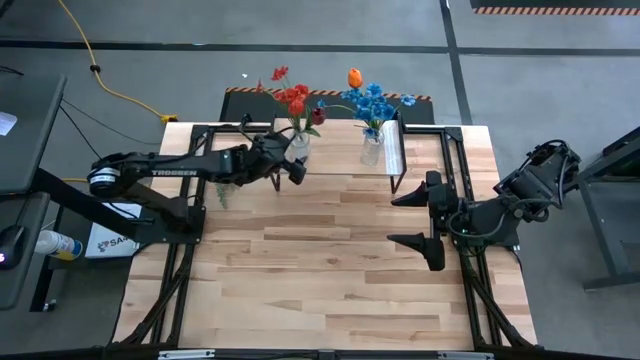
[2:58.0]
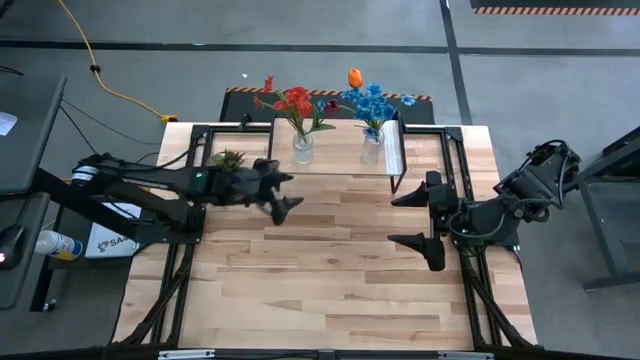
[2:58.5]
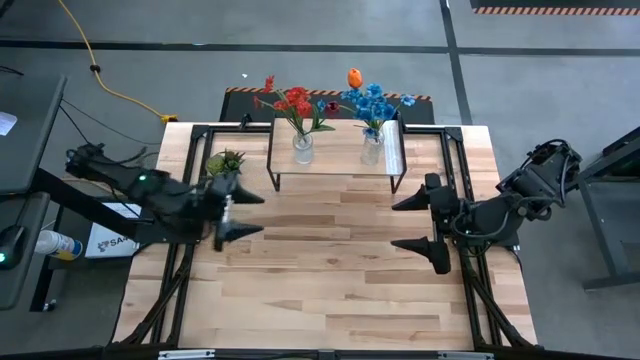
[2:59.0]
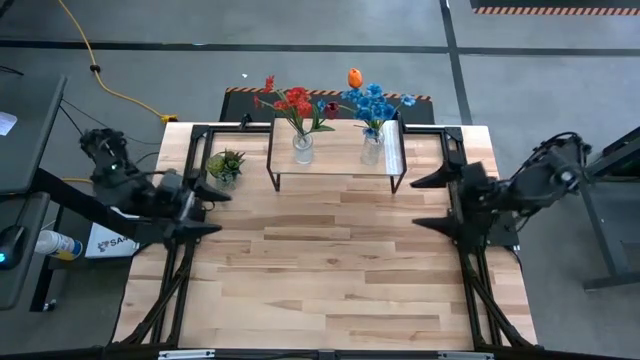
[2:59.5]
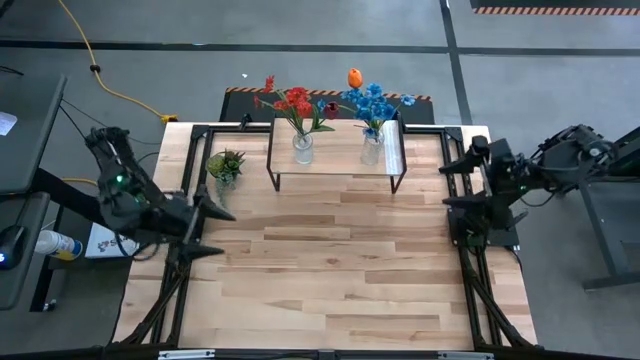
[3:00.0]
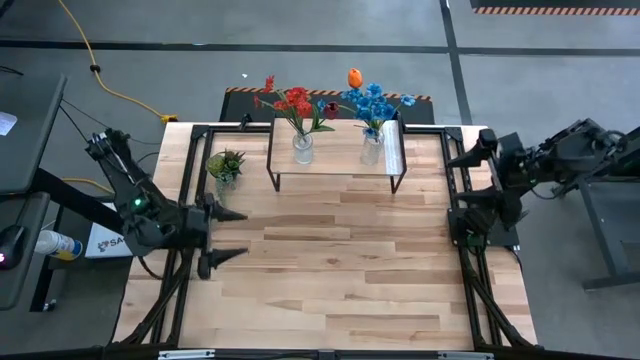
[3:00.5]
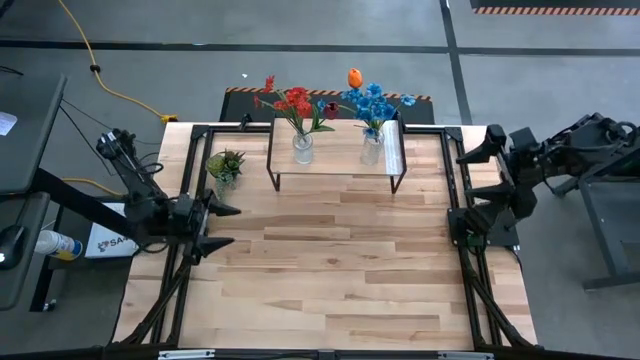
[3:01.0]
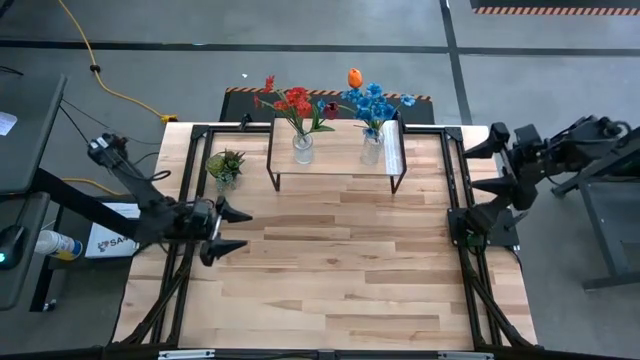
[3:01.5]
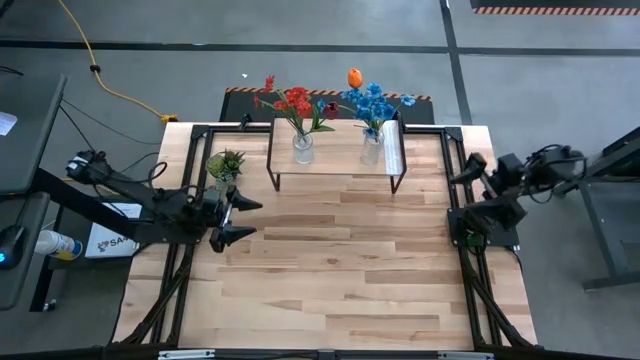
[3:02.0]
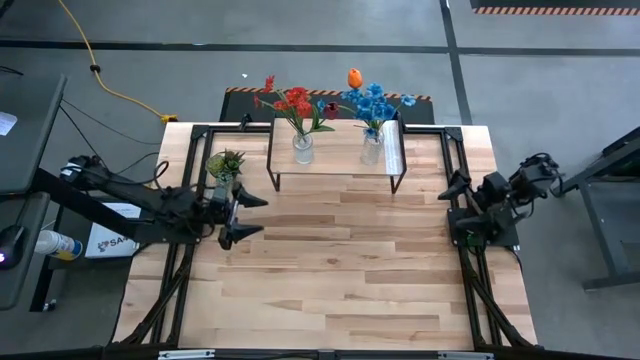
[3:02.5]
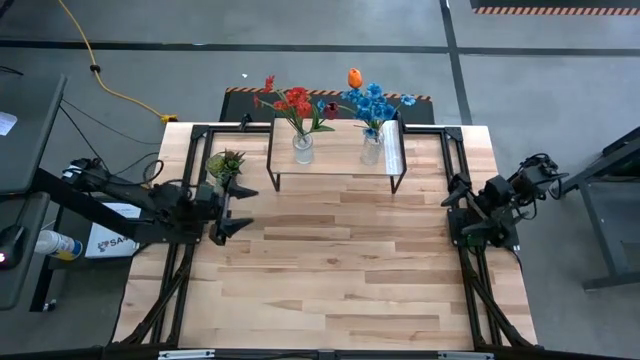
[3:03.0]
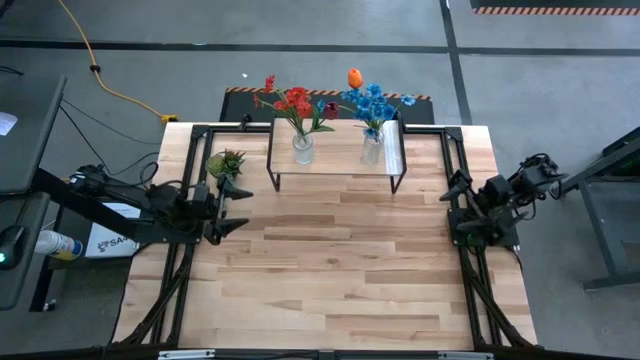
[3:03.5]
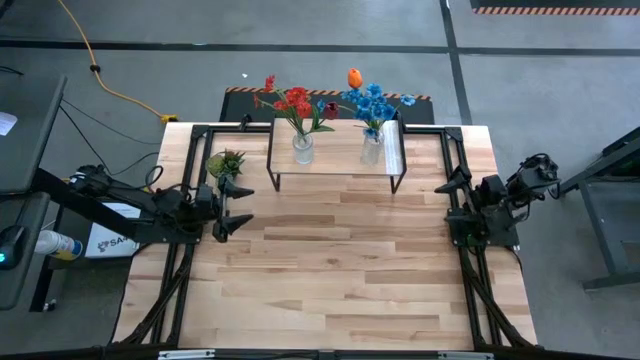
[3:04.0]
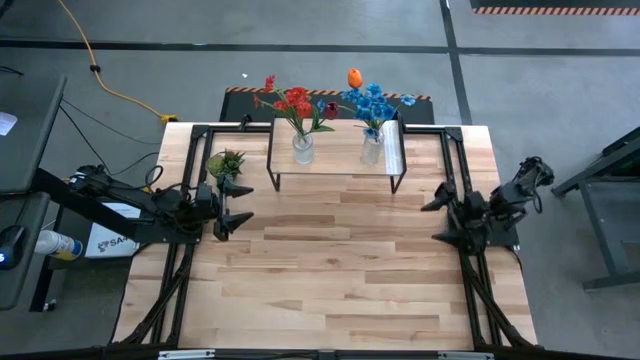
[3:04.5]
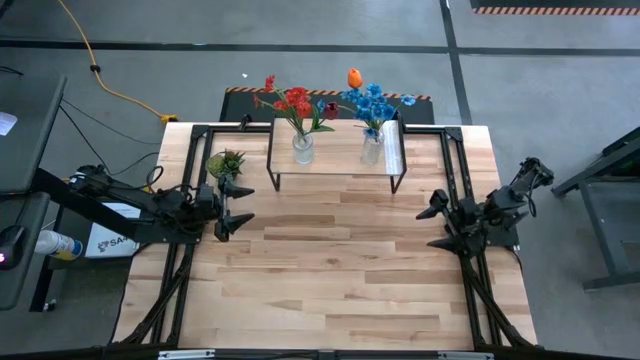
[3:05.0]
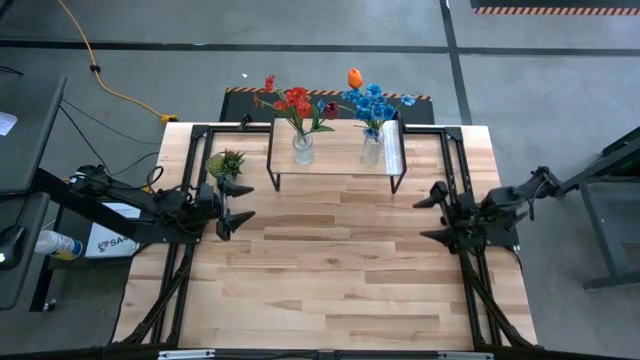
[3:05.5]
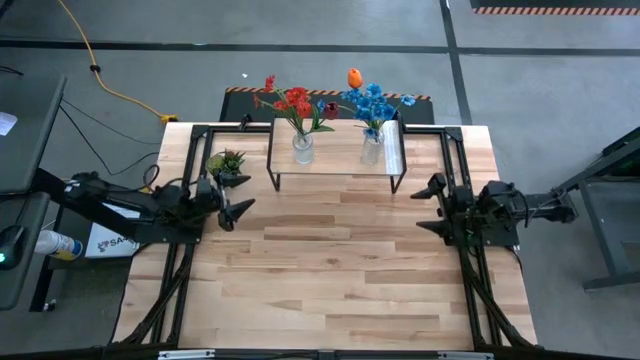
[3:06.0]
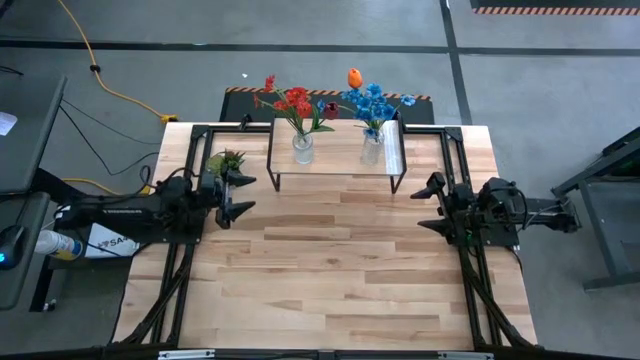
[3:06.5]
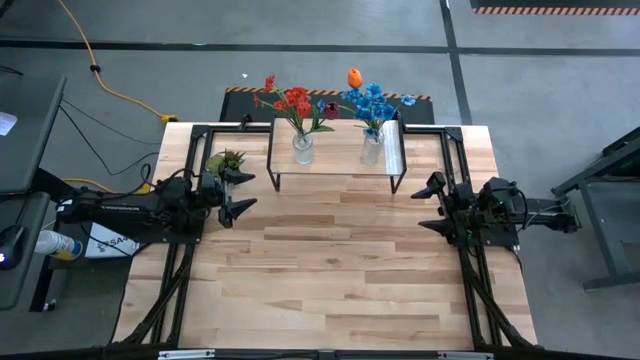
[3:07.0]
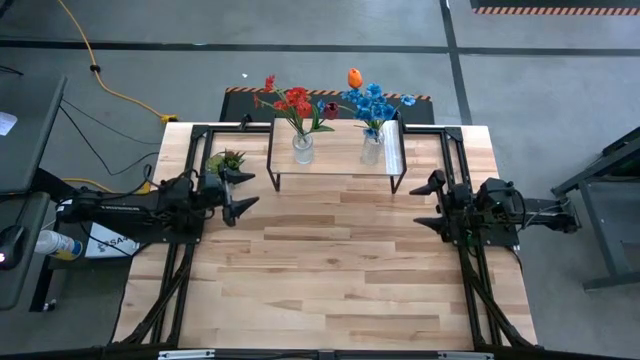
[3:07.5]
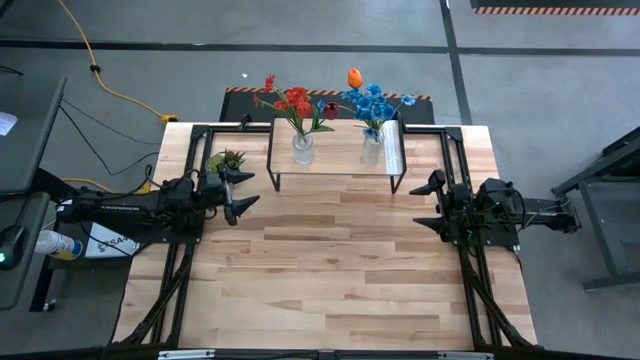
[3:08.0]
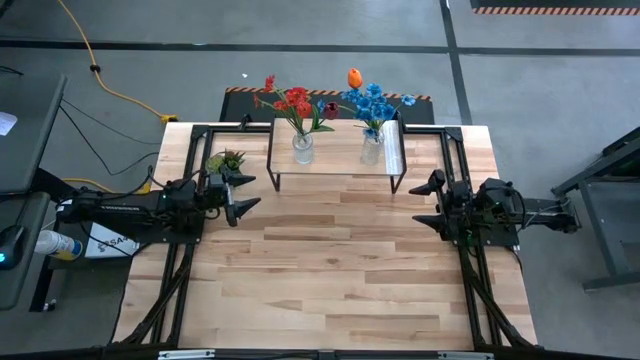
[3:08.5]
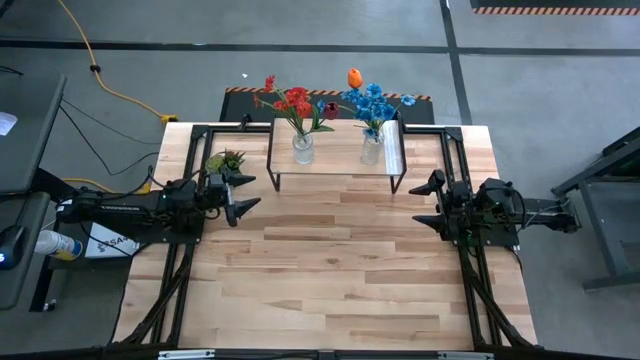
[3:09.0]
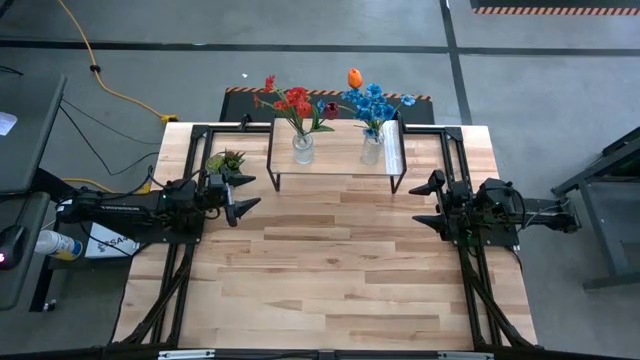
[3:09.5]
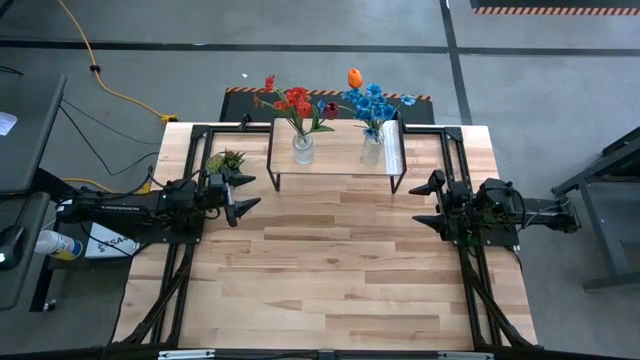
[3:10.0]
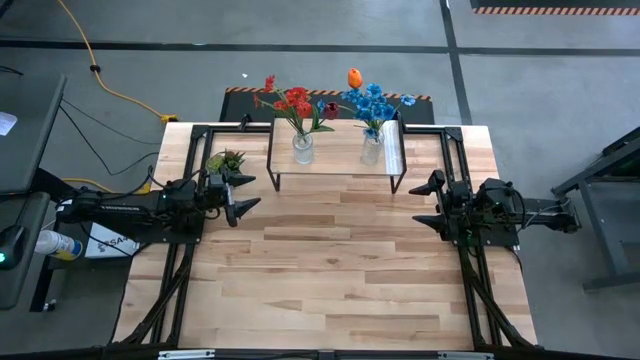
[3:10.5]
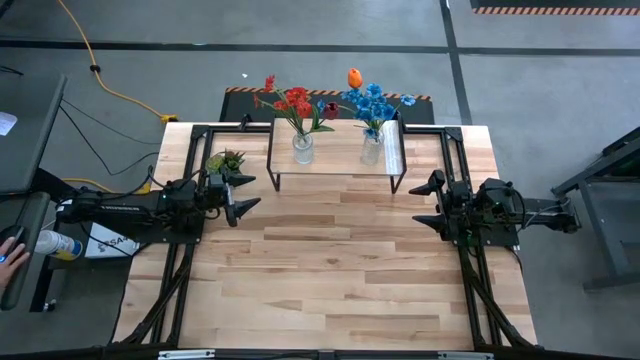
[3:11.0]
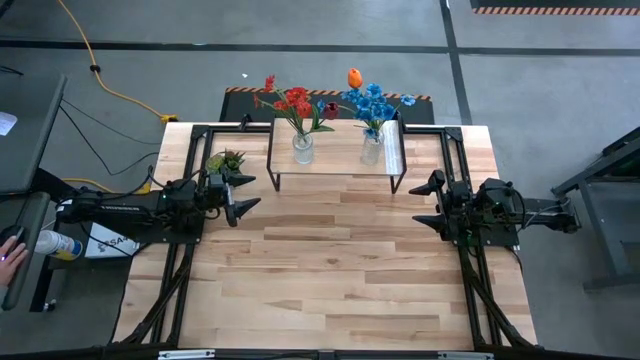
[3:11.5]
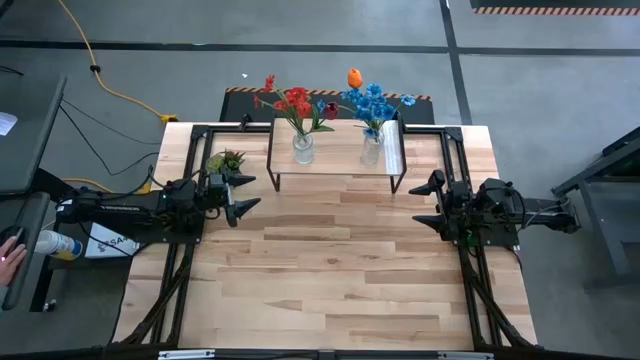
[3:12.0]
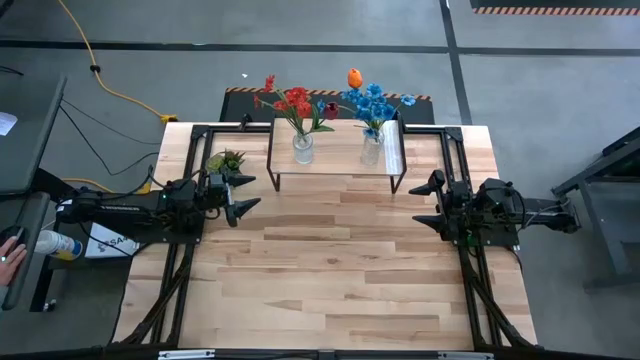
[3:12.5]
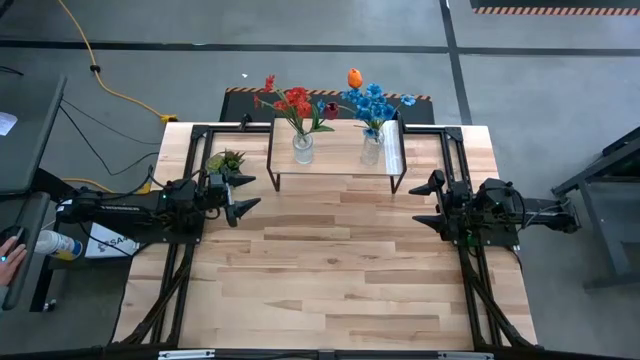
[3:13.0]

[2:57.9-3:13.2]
Task: Pick and place flowers into a vace then onto a shelf
Return to Home Position
